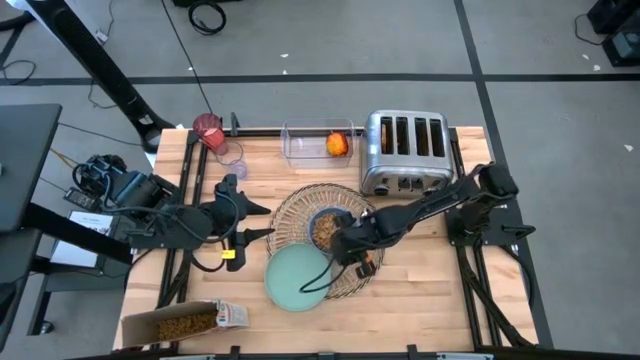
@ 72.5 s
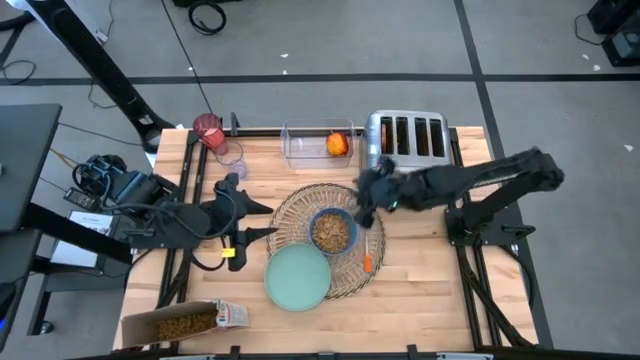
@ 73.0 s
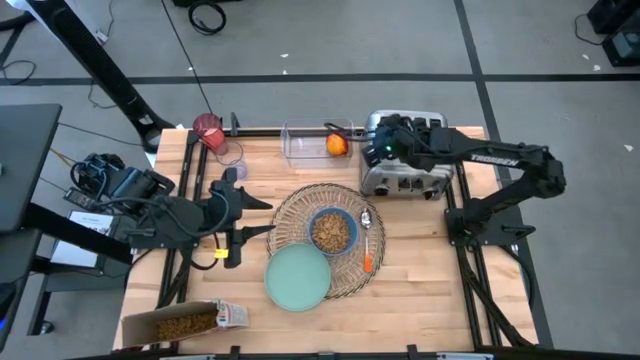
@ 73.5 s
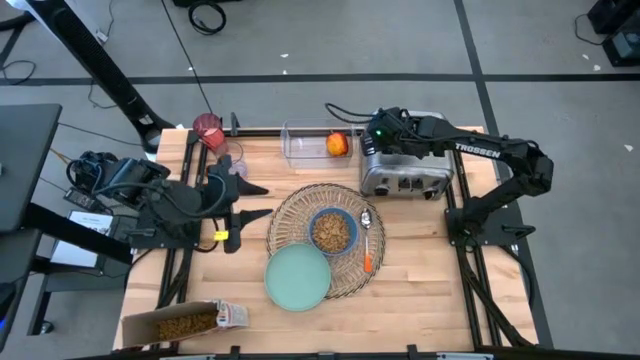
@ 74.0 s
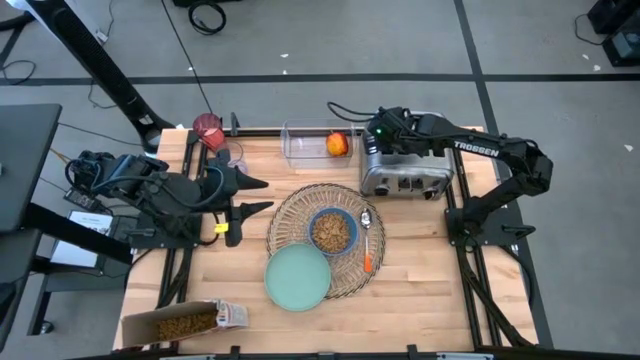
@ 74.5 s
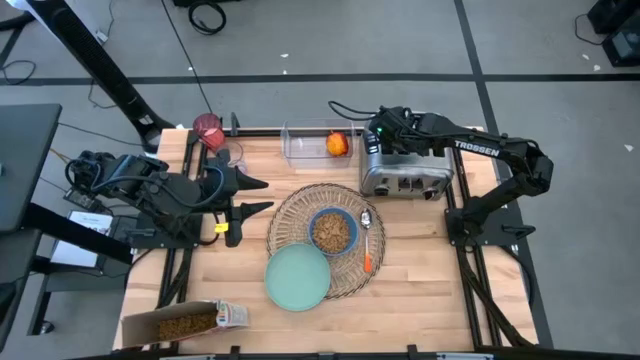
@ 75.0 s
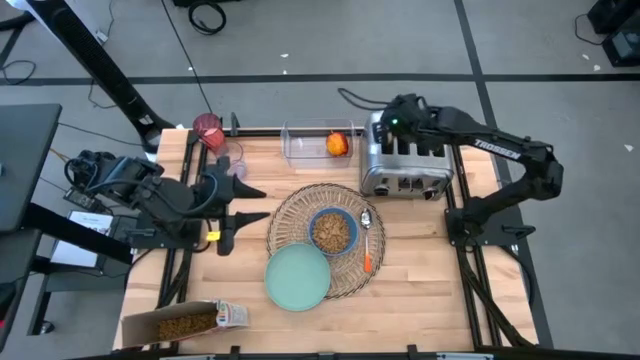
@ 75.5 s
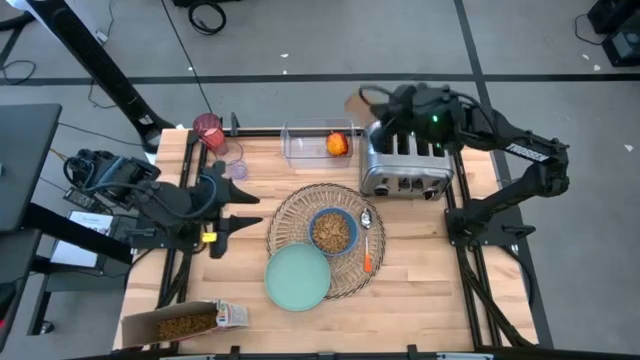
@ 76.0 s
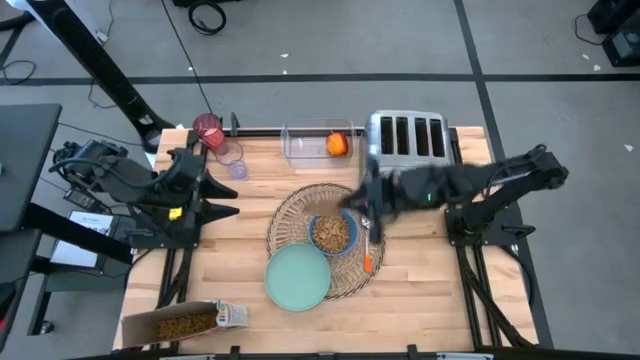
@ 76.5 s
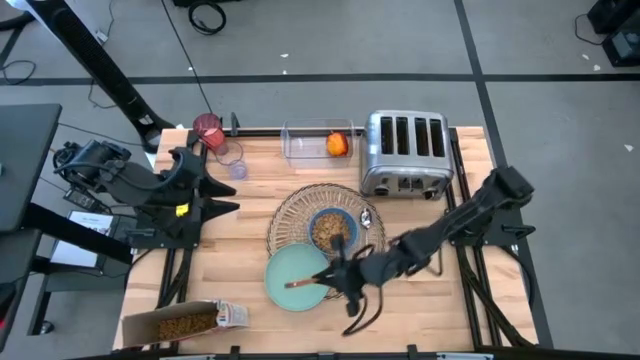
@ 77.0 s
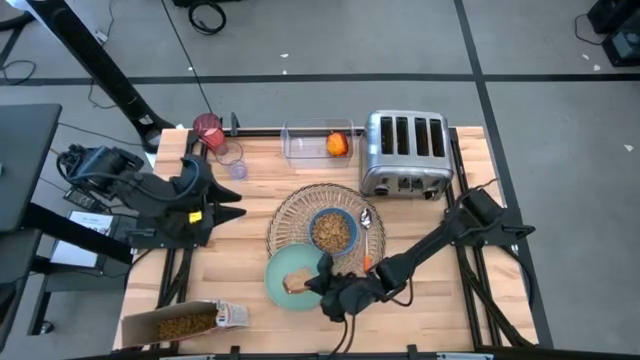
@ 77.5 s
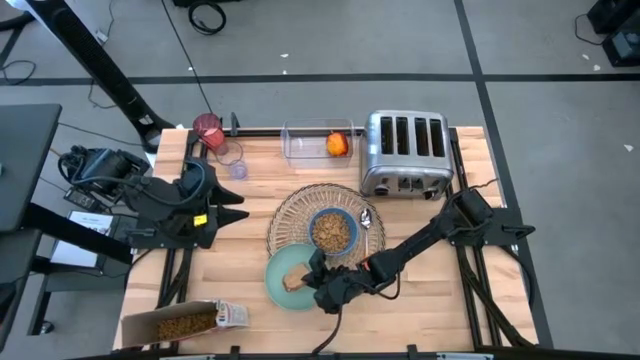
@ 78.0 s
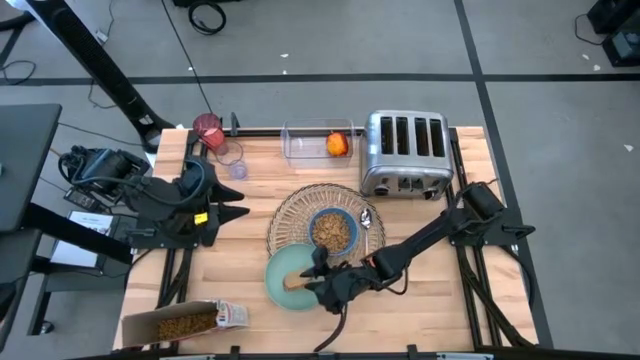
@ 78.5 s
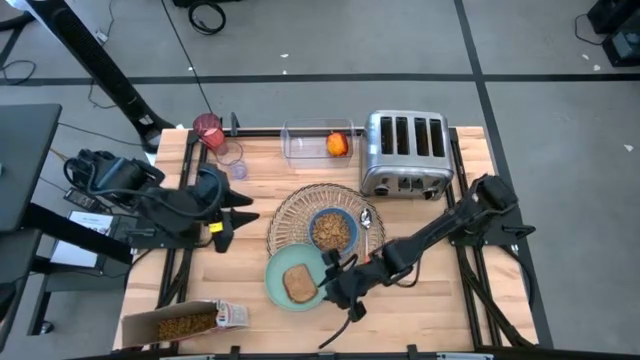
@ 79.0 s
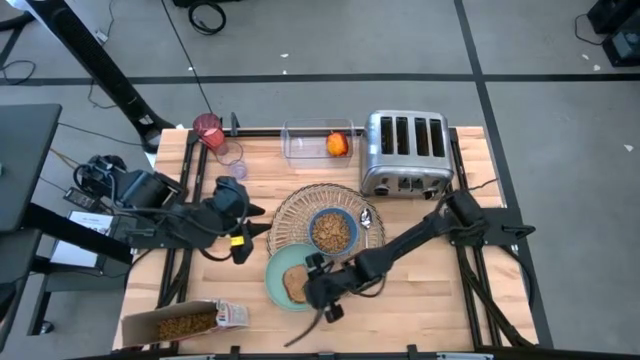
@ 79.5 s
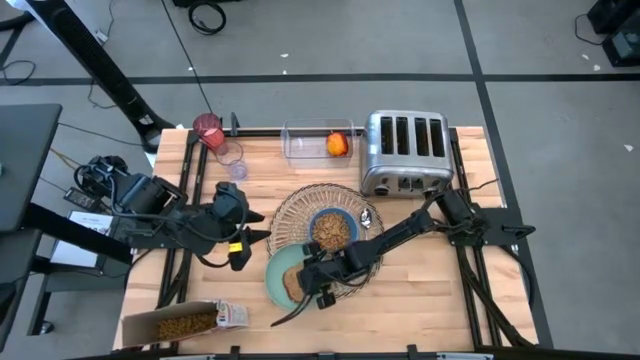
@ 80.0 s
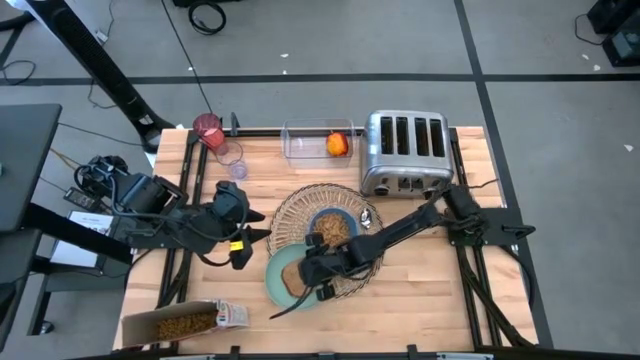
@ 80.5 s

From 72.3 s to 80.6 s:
Task: Arrange a breakfast setting
Put the toasted bread on top of the light green plate on the brown placemat

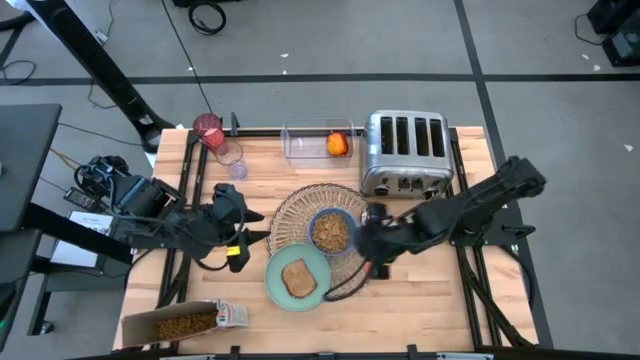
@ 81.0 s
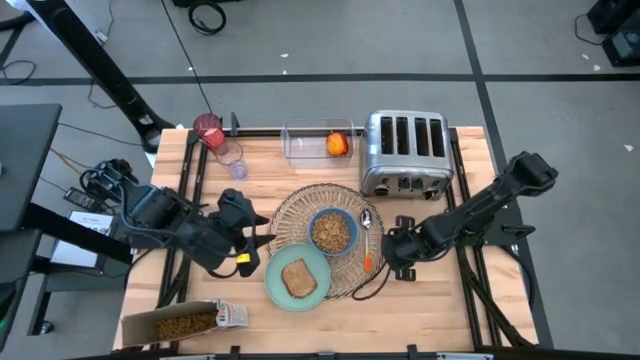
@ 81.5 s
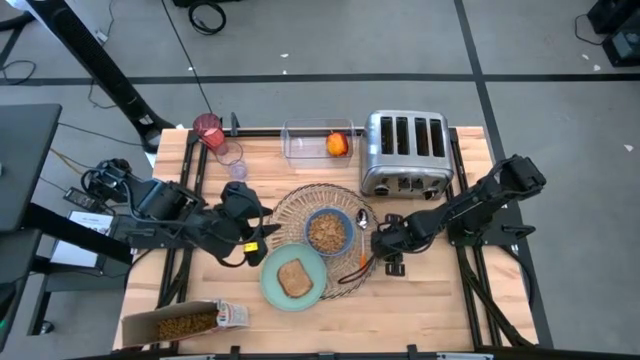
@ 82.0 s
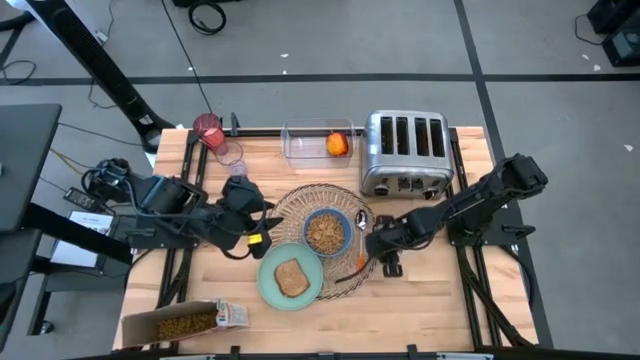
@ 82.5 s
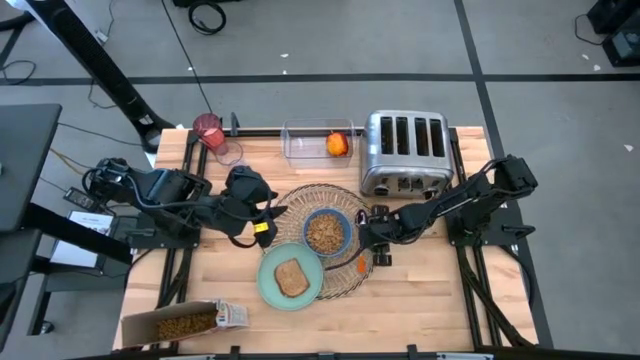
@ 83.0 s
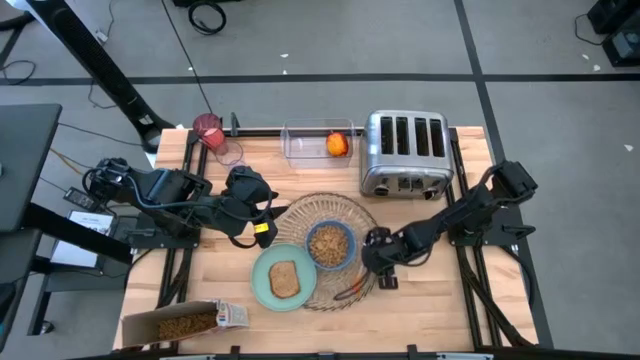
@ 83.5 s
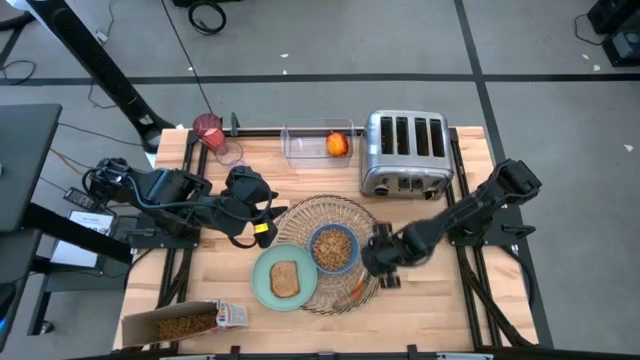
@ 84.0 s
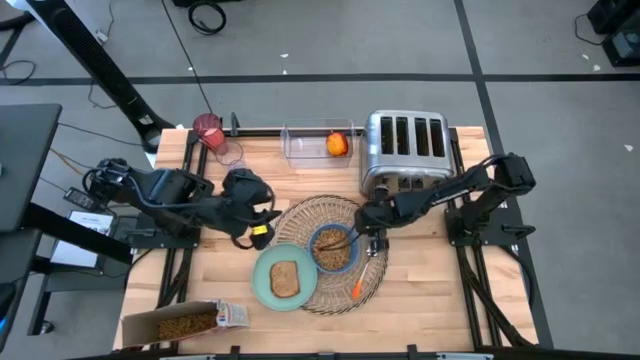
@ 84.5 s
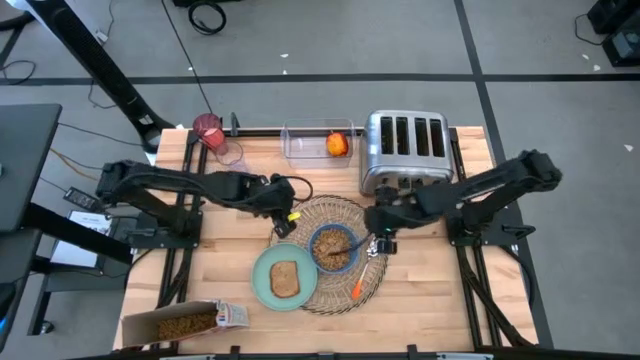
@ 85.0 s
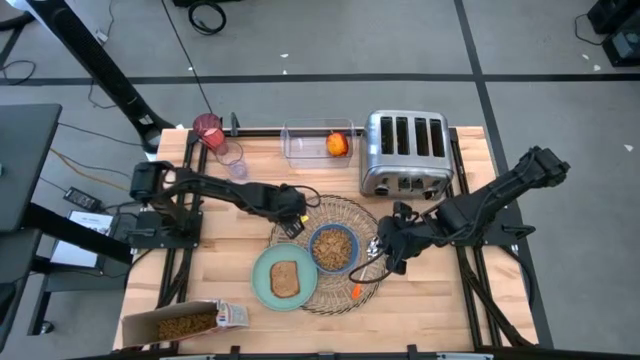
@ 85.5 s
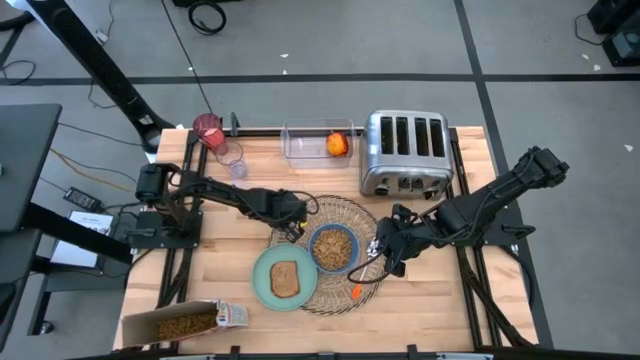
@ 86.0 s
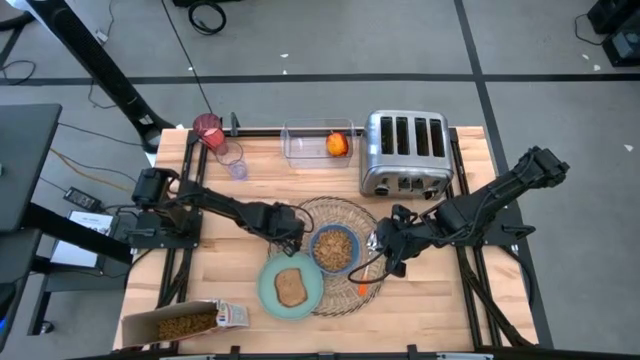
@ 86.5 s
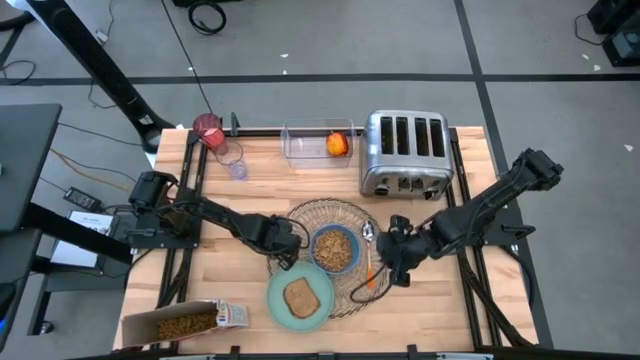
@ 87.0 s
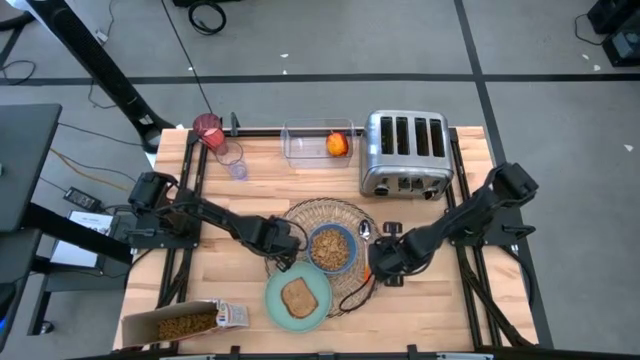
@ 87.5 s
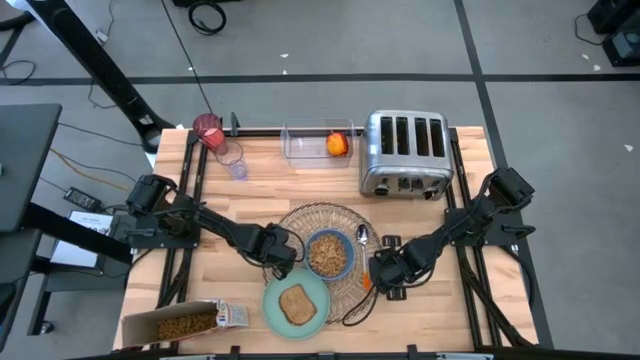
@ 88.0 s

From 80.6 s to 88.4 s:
Adjust the brown placemat

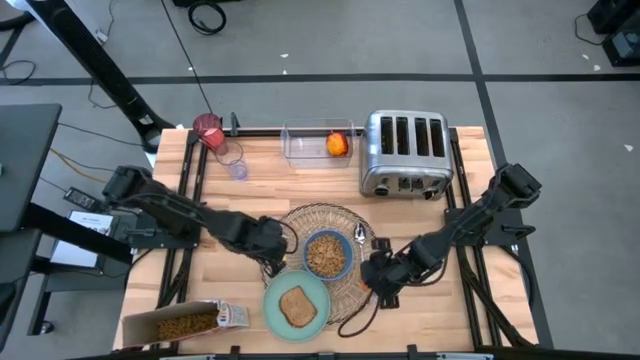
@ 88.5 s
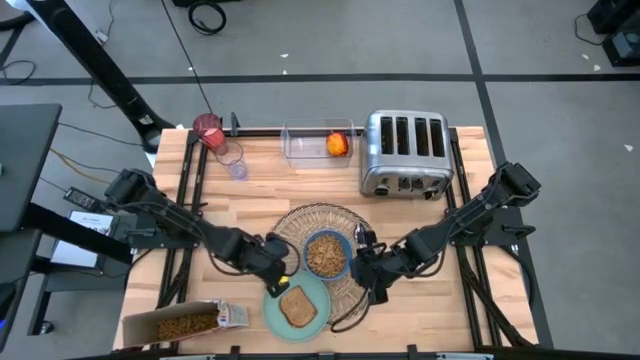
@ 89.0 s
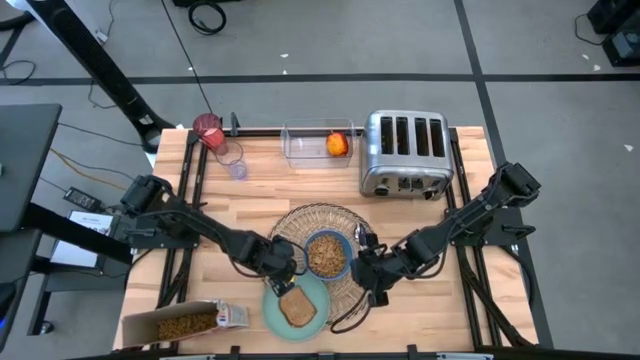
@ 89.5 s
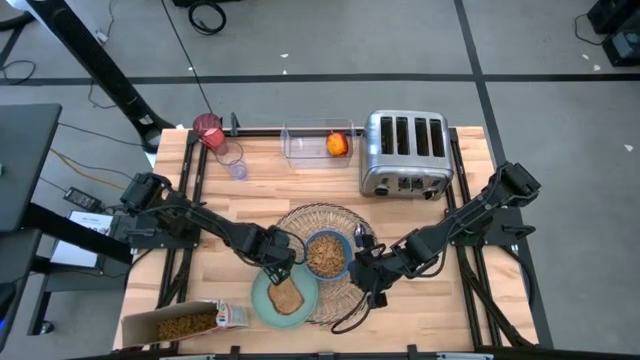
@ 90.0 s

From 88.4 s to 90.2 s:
Adjust the light green plate on the brown placemat

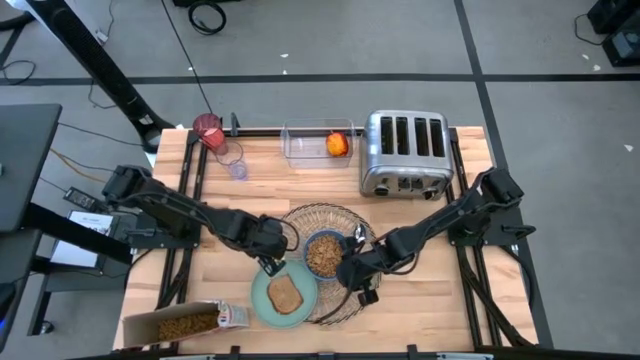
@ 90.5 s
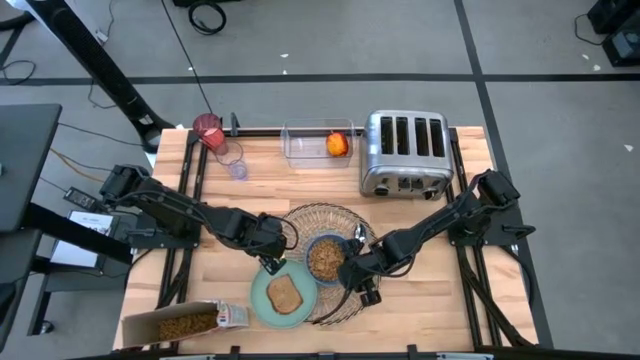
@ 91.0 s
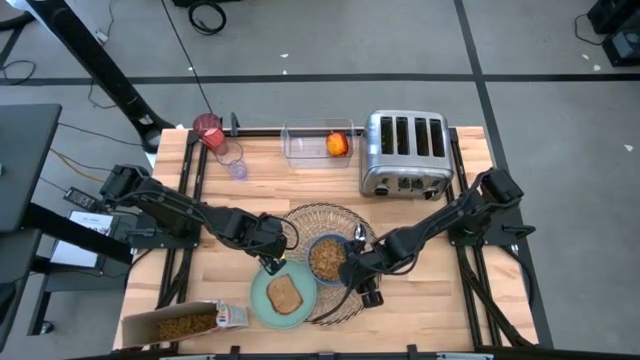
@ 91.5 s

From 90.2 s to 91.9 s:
Adjust the blue bowl on the brown placemat

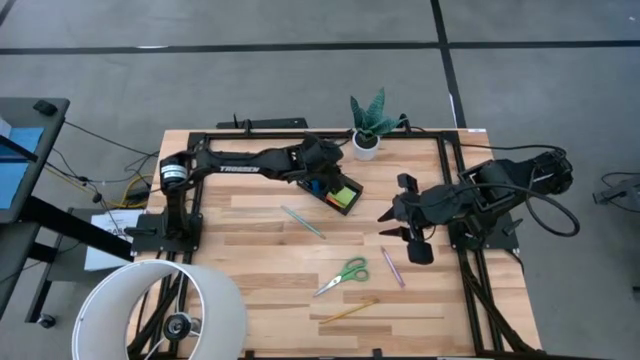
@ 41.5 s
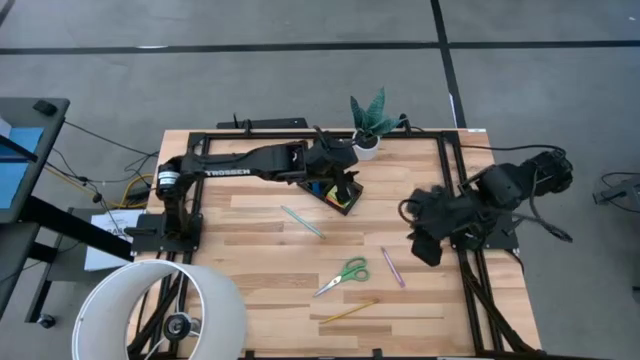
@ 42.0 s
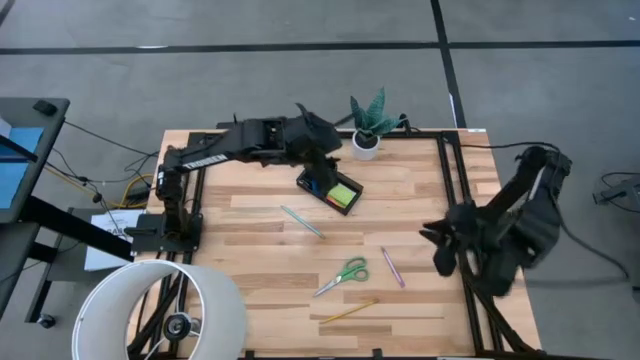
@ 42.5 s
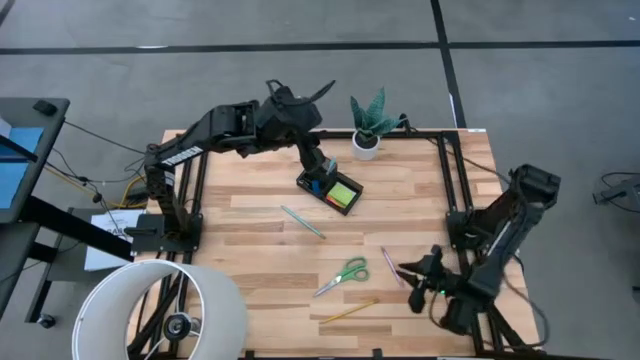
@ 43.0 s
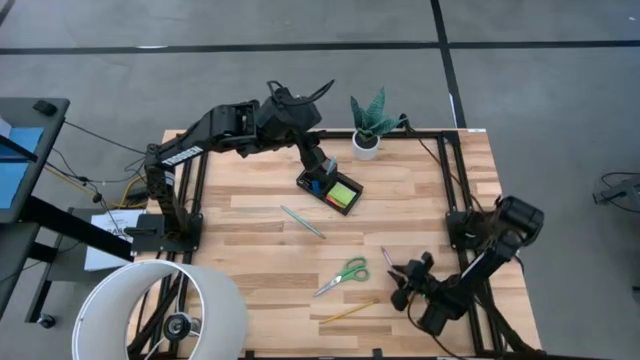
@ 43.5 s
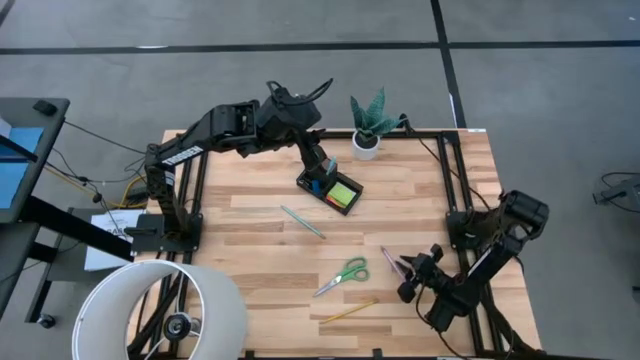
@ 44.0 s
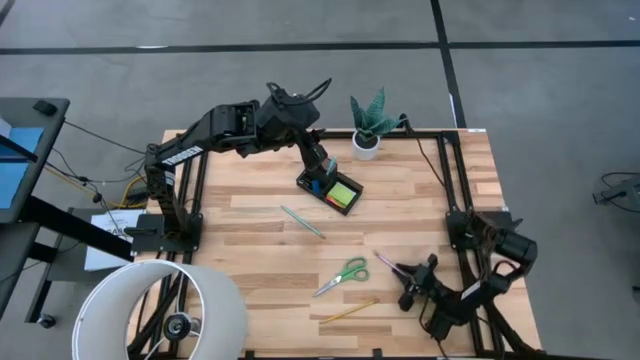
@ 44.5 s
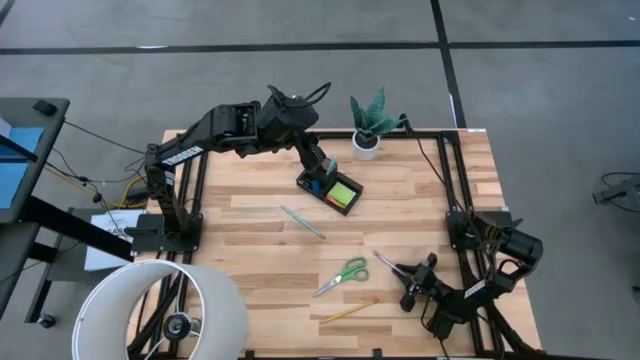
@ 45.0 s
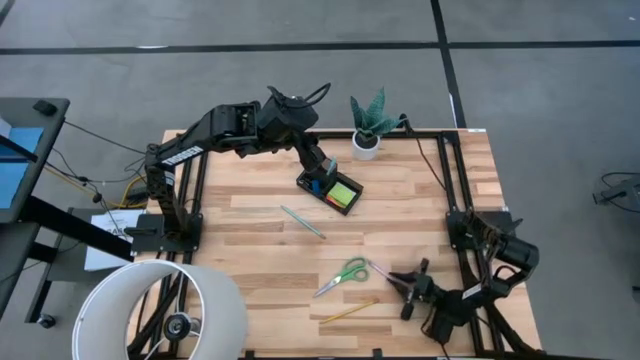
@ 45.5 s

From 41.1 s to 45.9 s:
Task: Pick and place office supplies into organizer
Put the purple ballpen into the black desk organizer
